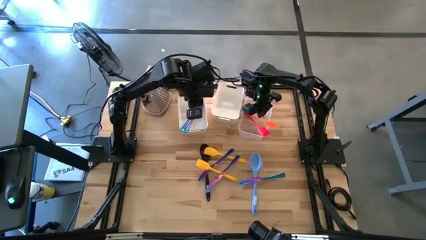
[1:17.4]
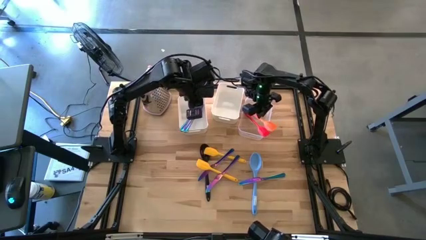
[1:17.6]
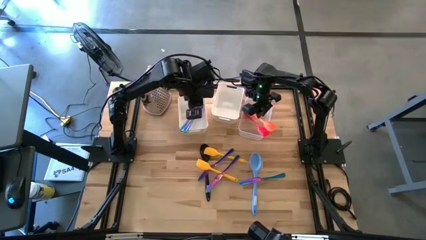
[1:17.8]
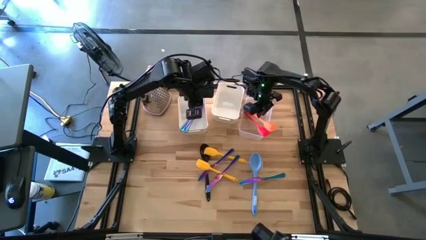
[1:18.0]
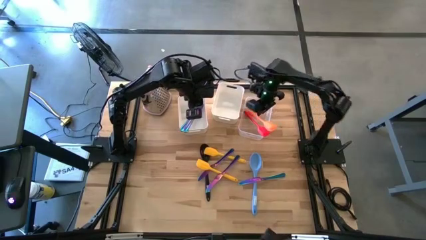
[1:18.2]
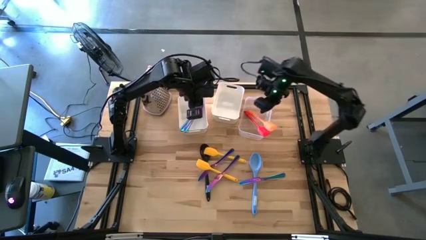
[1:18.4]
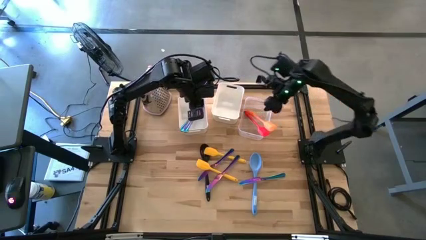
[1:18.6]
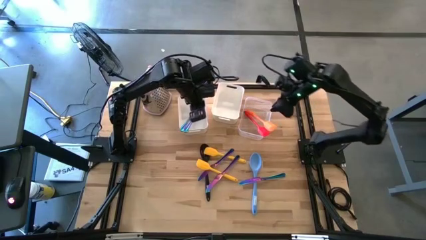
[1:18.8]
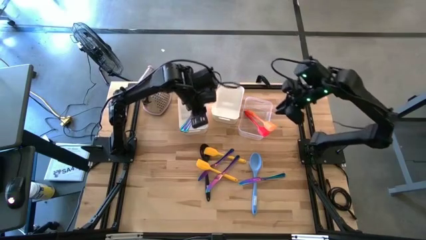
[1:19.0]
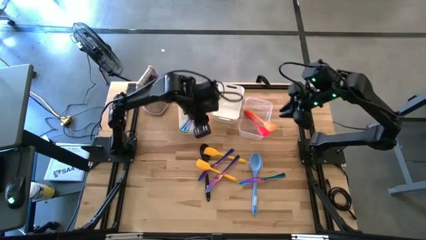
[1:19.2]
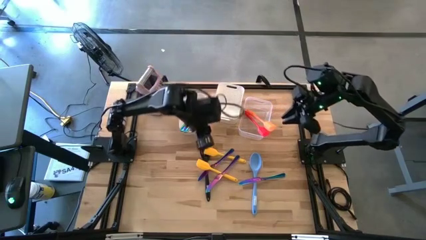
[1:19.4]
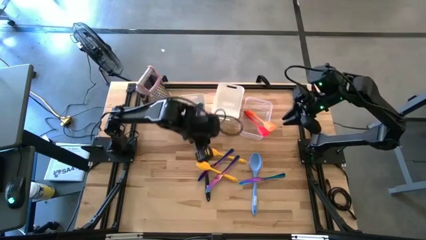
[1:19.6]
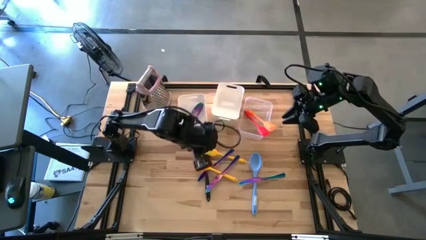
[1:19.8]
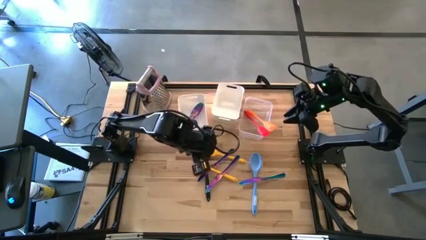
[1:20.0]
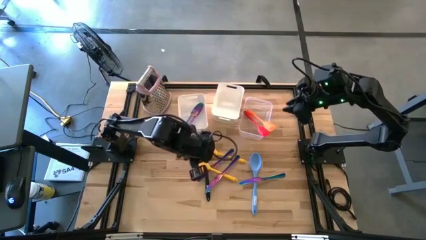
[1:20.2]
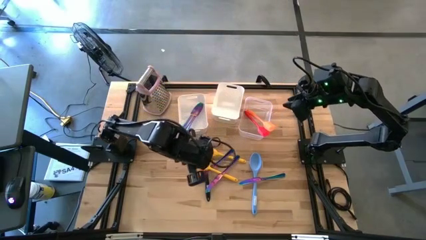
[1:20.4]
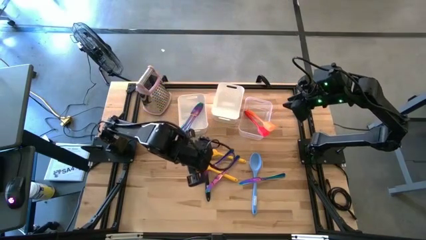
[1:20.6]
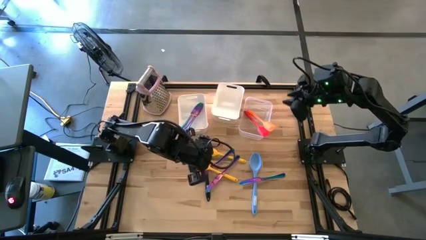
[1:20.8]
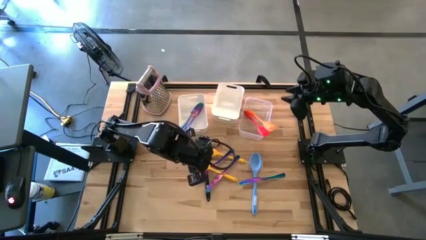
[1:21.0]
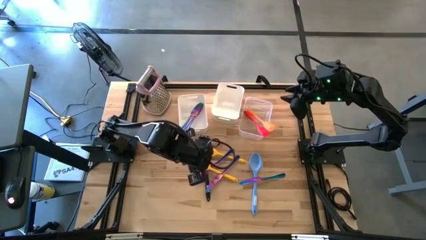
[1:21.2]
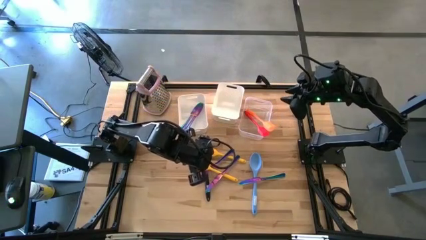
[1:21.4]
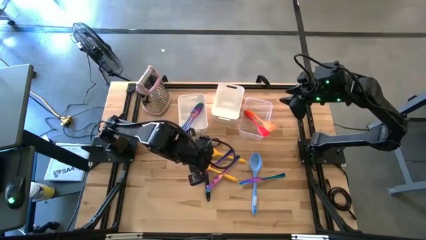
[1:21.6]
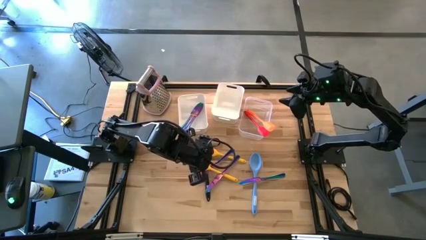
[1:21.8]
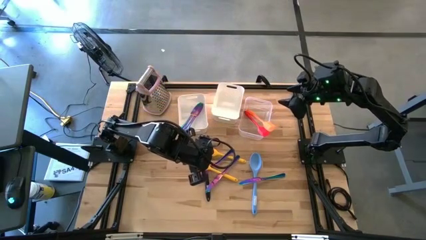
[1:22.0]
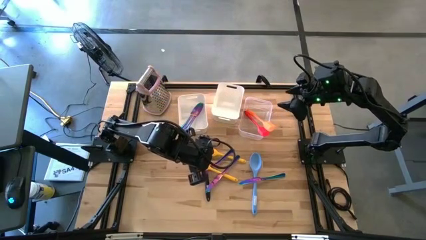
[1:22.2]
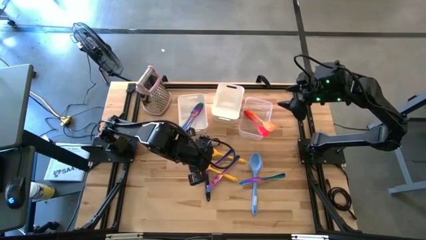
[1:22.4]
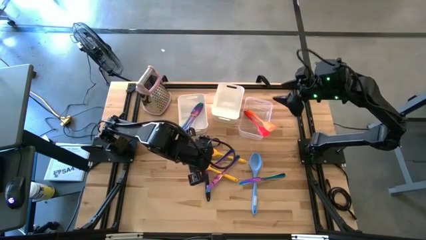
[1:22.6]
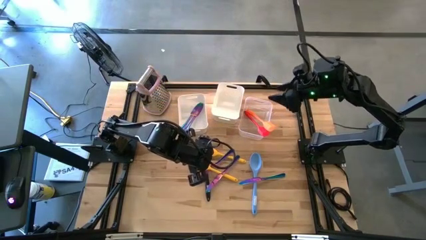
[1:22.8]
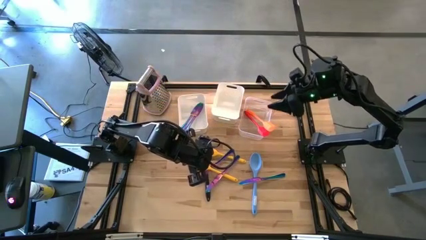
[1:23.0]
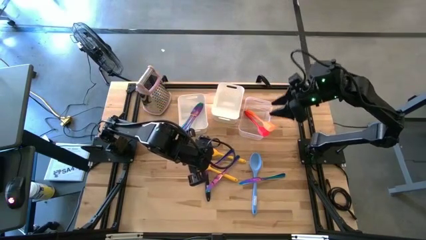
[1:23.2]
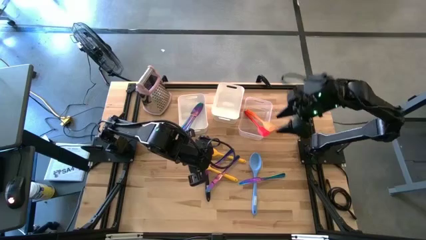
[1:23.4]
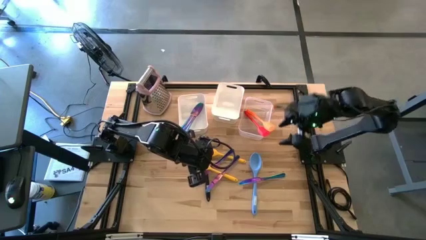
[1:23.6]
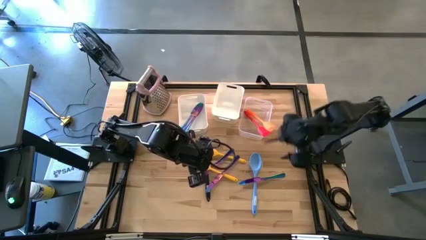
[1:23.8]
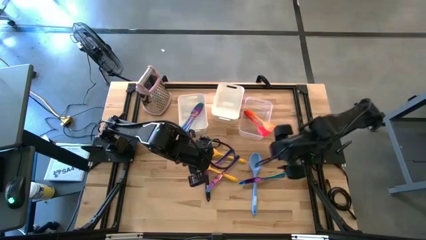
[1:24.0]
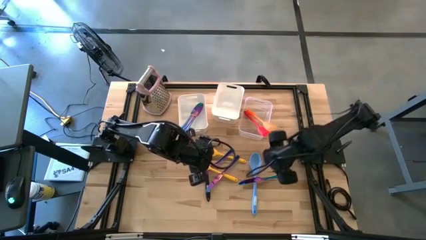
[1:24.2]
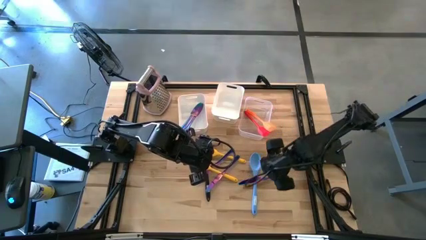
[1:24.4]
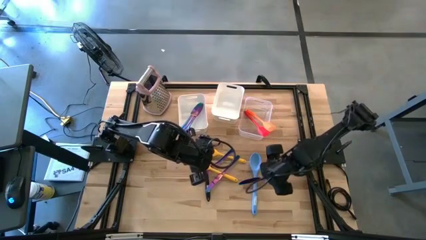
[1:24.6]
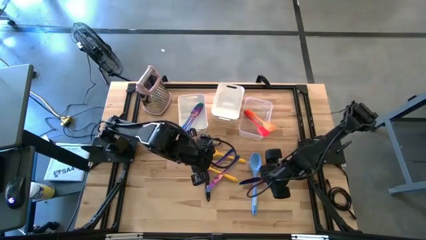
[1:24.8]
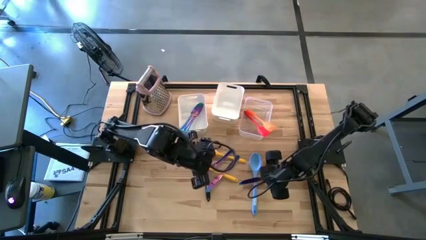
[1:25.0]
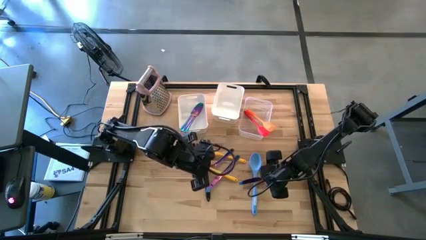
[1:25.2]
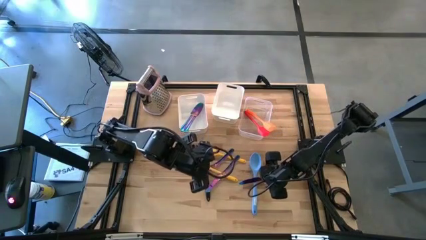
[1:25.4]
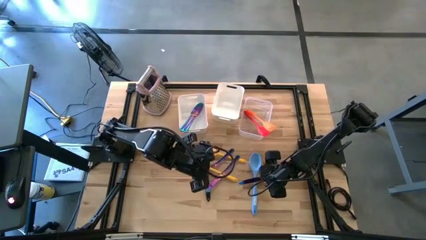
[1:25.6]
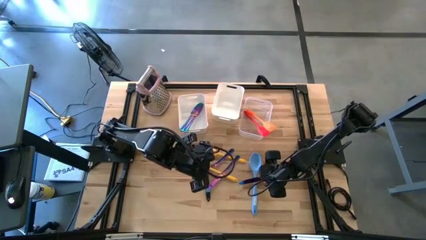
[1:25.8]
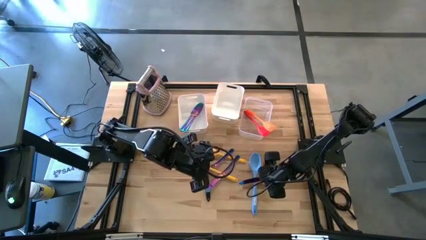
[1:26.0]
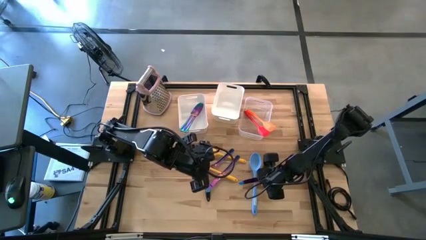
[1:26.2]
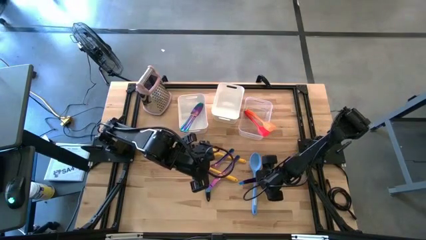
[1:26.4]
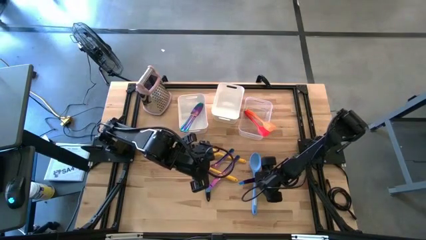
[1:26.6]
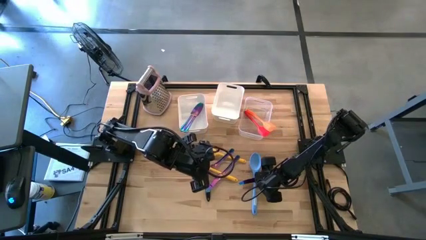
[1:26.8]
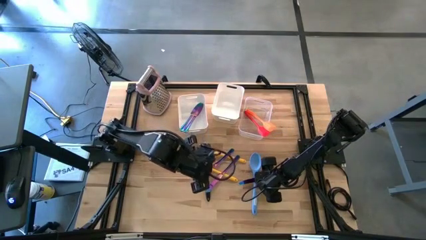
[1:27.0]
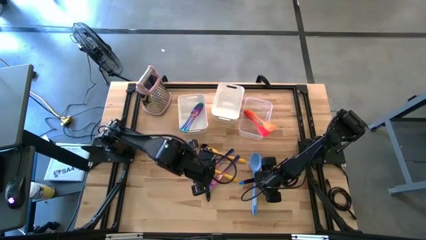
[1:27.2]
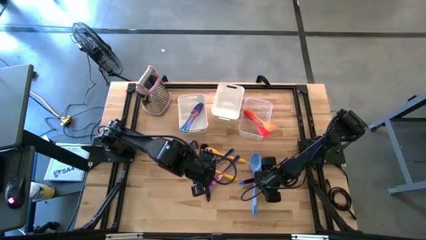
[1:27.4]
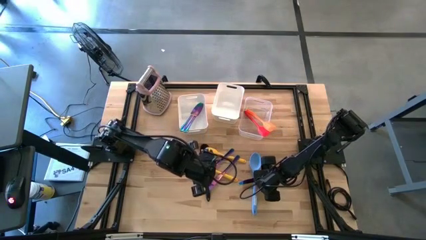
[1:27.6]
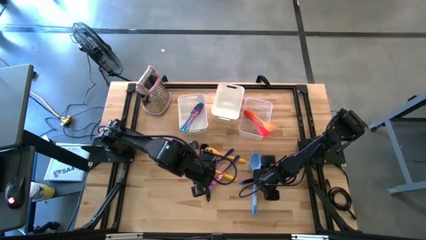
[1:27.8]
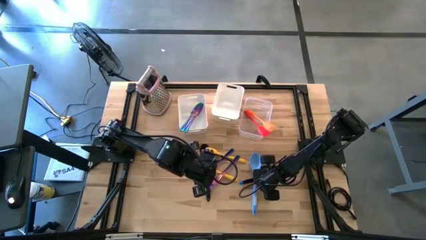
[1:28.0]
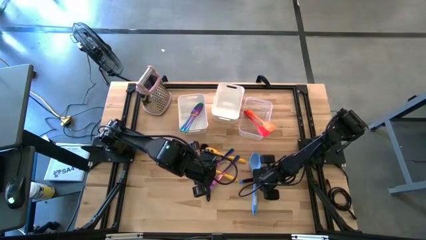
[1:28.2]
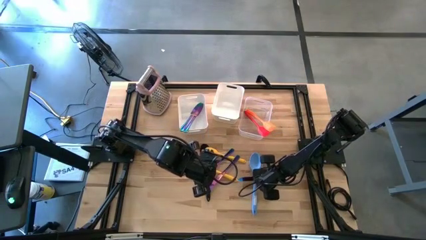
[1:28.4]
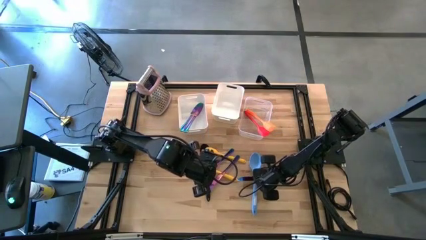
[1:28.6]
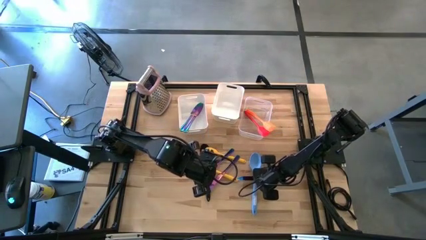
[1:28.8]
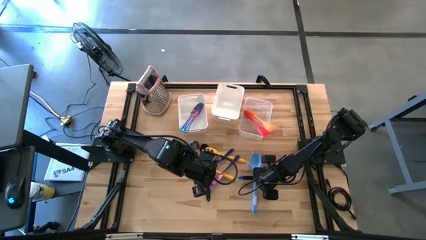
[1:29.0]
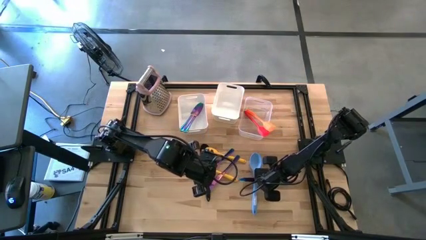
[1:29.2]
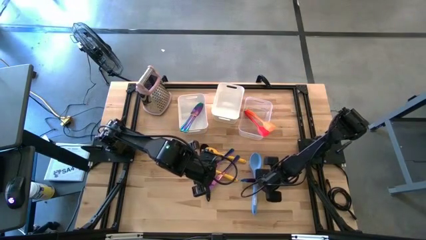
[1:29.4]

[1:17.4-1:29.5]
Task: Pick & Place Kitchen Items
Put the violet table knife into the left white bin
